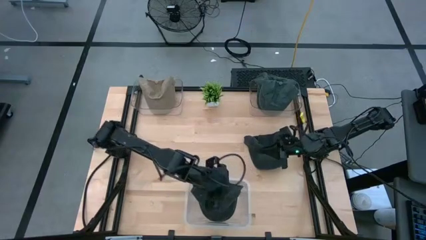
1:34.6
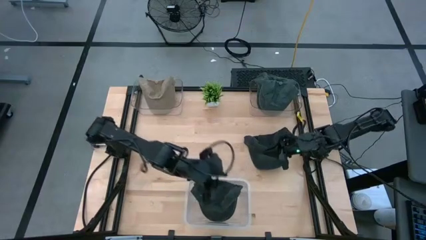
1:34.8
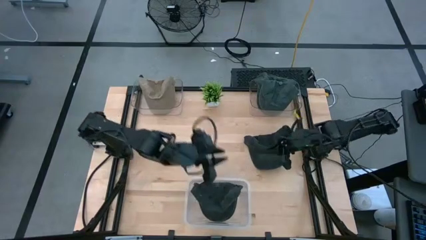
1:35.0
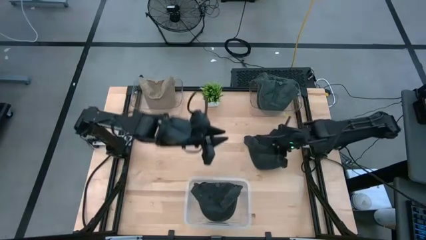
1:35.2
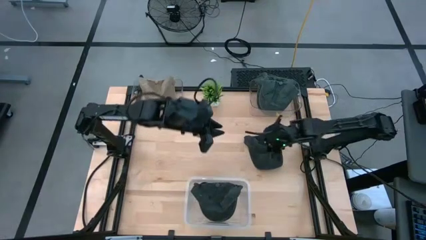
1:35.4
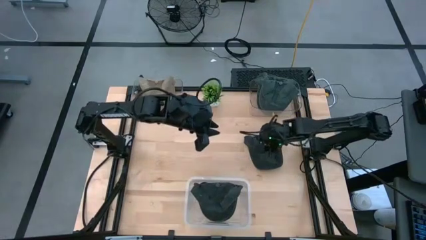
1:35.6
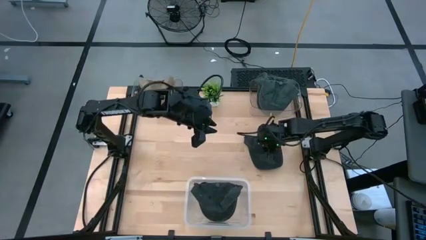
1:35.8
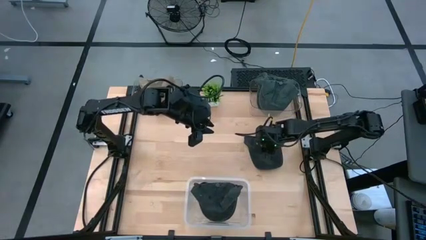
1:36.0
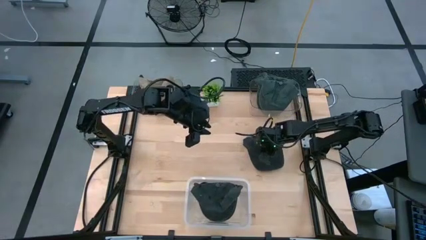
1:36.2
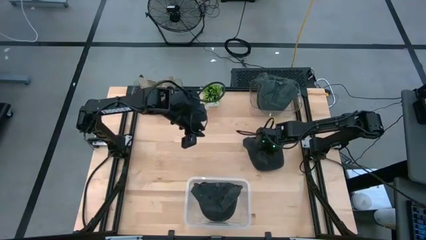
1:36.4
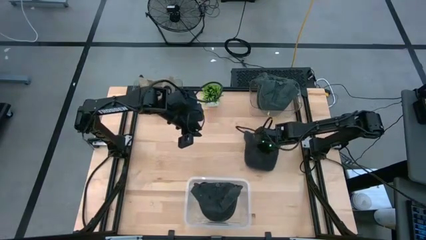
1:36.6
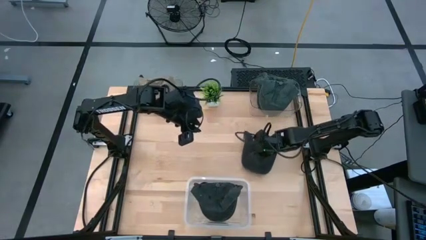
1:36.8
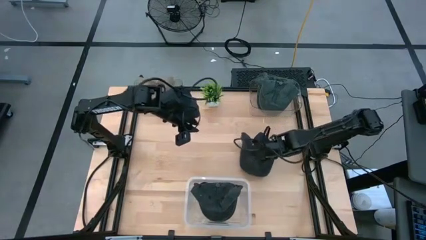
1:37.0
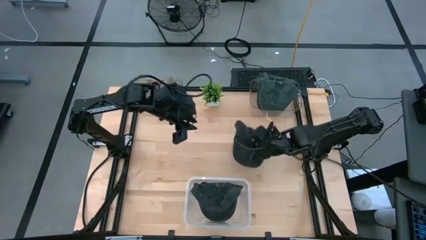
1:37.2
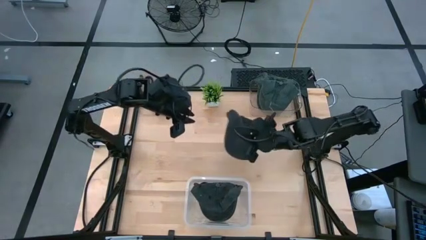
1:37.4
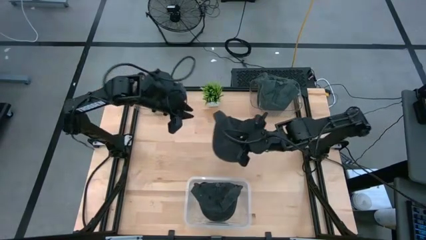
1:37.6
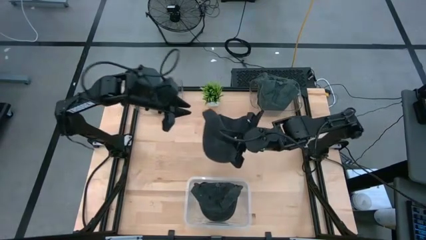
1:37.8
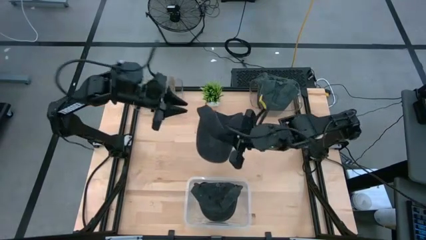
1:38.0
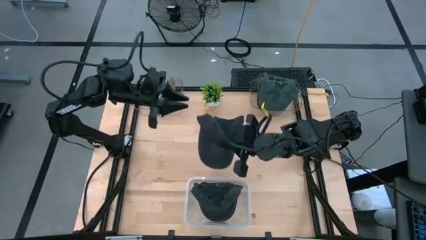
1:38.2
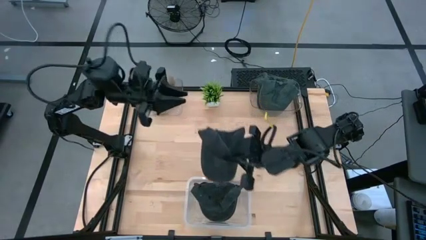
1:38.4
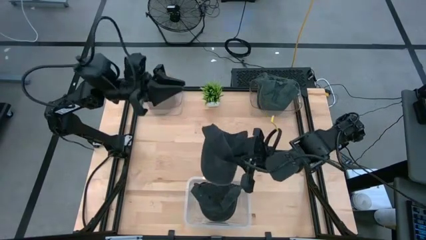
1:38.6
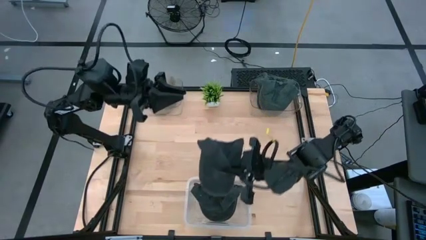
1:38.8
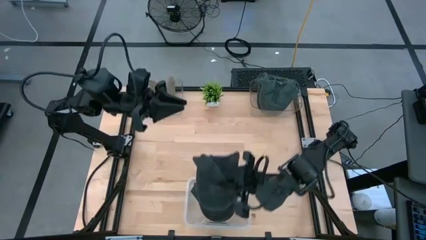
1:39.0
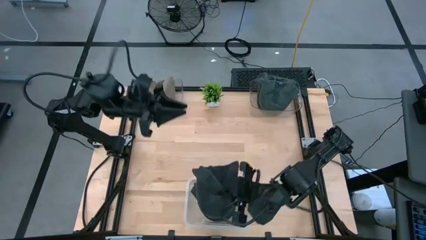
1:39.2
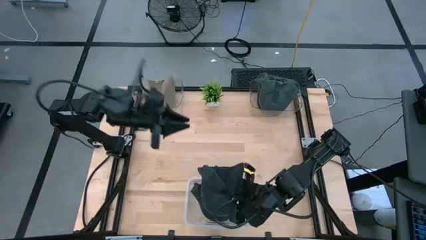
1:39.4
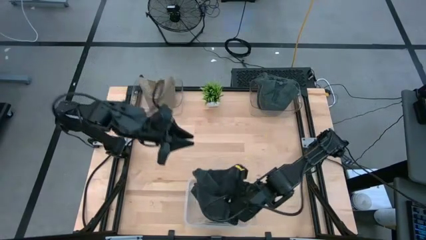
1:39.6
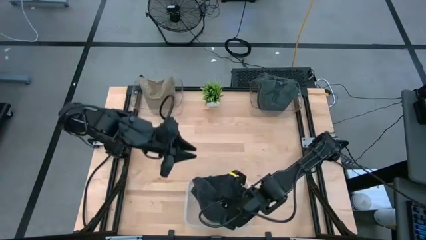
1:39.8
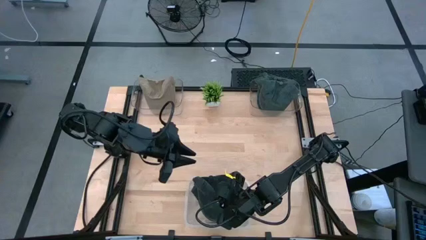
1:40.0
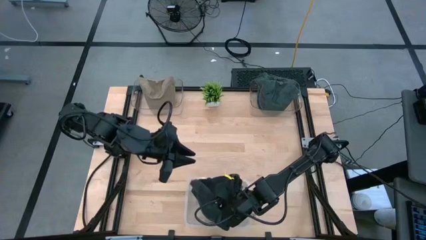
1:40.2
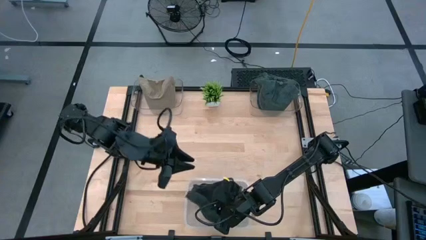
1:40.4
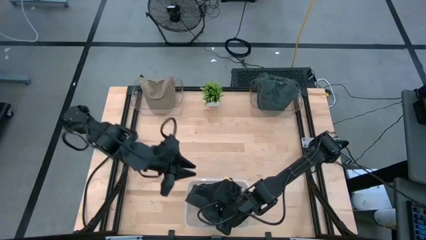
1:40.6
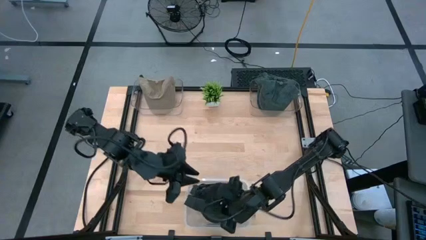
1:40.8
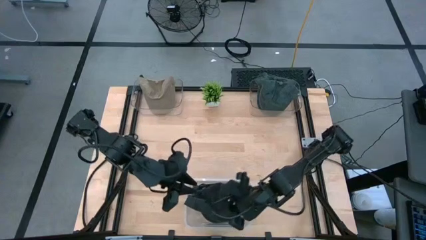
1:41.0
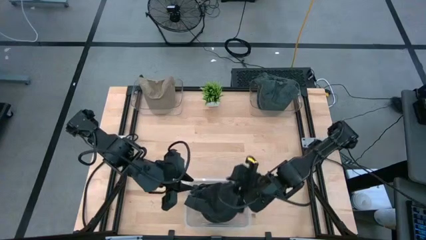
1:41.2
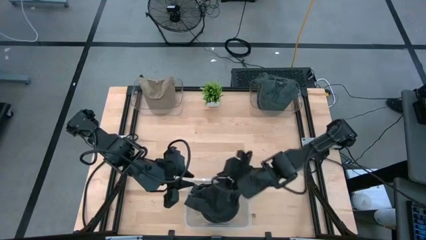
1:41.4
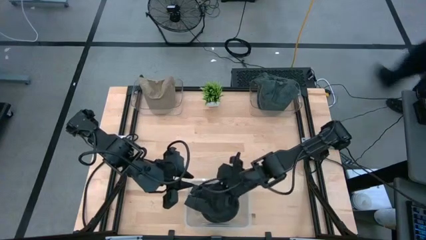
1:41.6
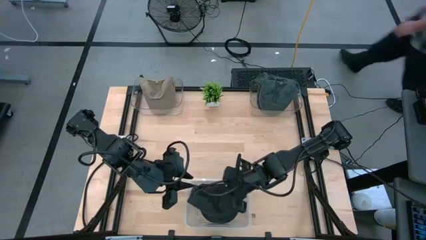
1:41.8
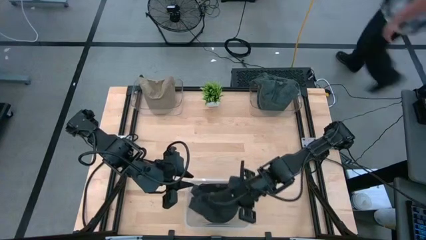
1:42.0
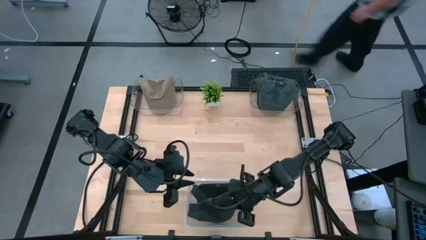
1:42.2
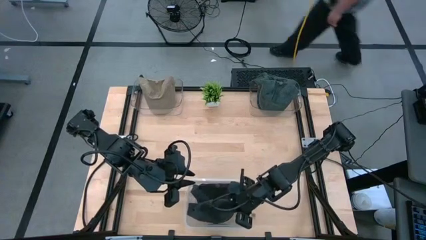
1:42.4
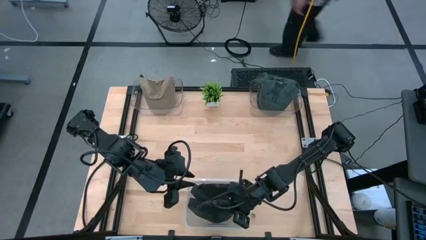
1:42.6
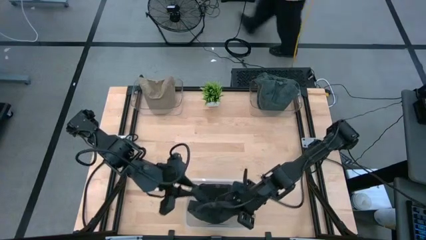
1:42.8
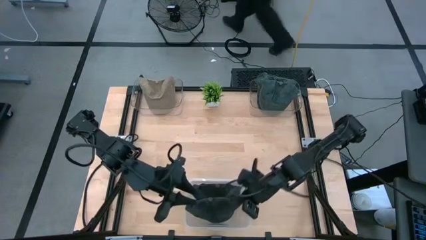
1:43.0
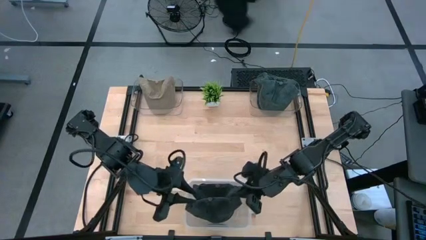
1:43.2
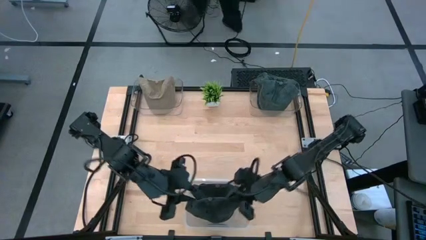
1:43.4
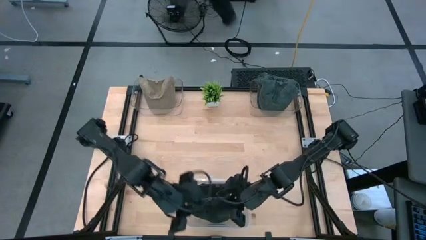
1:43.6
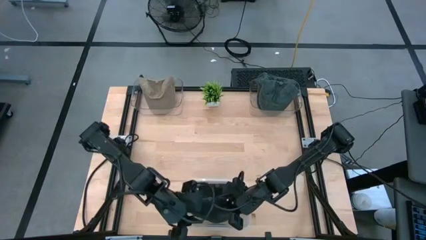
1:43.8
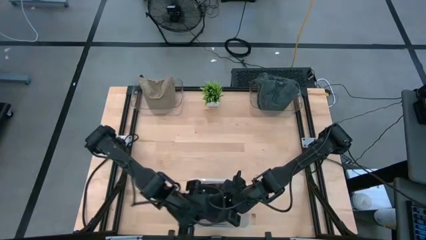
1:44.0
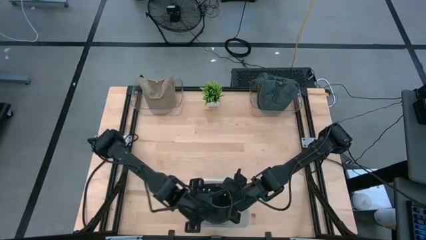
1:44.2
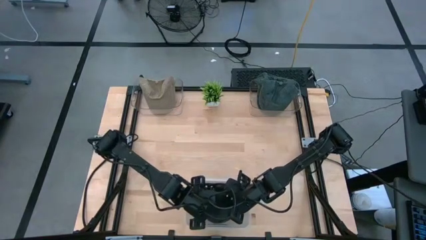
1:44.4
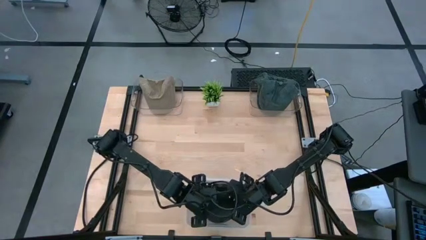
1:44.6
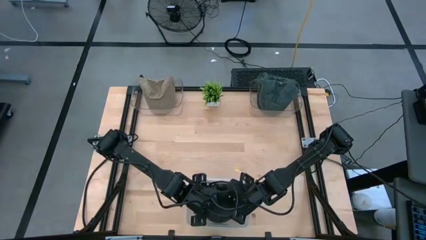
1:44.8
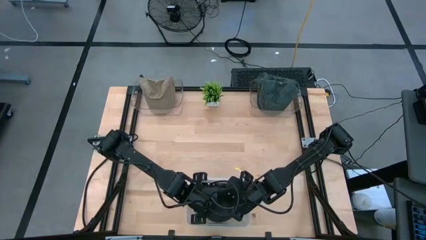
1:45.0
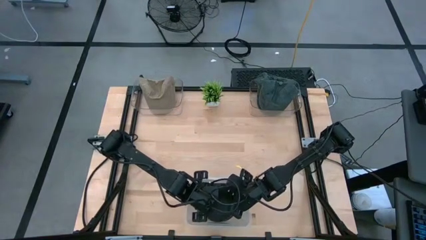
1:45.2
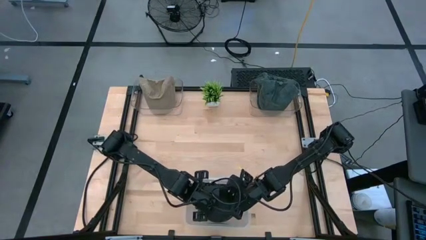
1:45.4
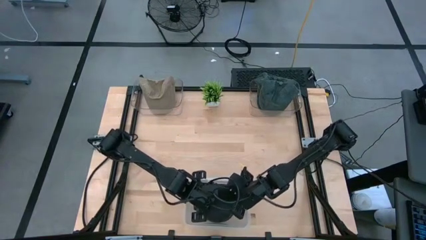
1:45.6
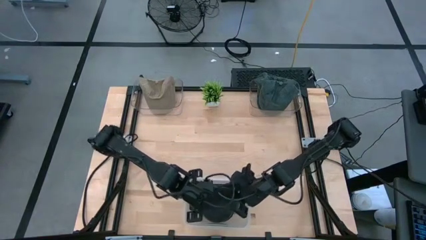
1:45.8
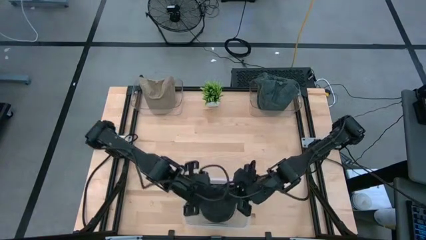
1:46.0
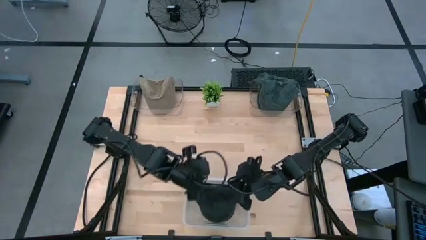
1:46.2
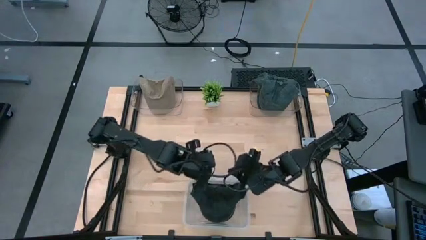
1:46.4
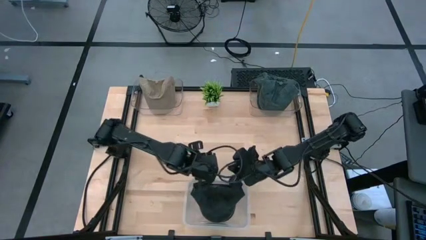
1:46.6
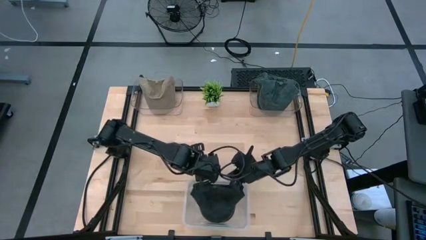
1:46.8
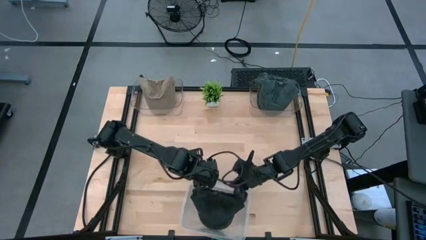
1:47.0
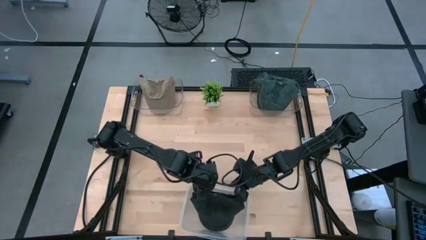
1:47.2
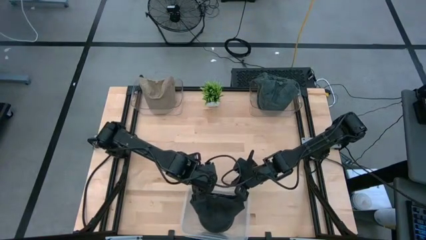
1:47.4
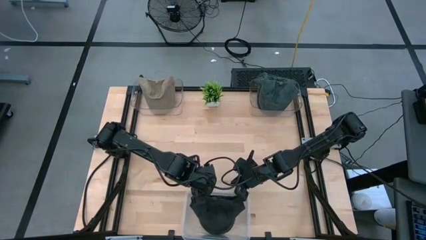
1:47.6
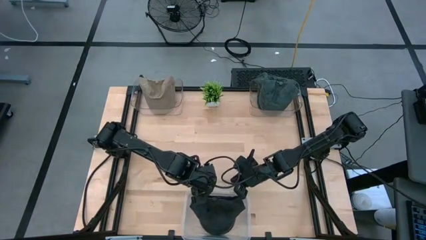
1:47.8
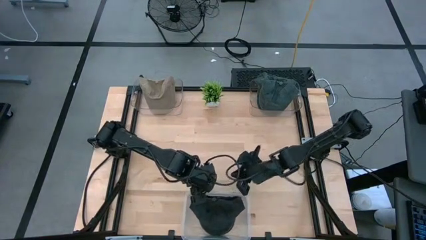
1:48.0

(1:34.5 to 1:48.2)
Task: Pick & Place hat
Put the black cap into the white transparent bin

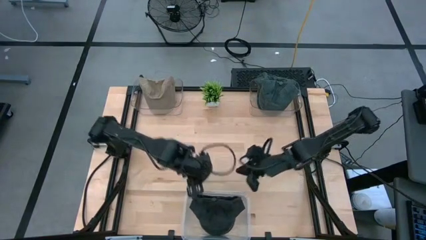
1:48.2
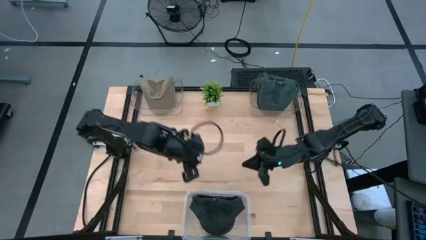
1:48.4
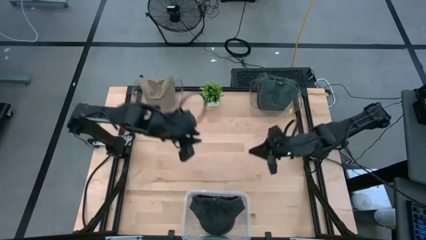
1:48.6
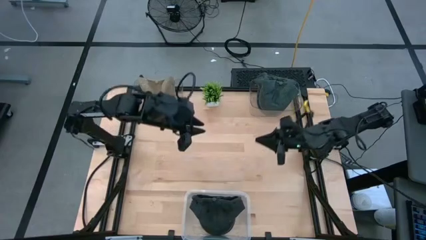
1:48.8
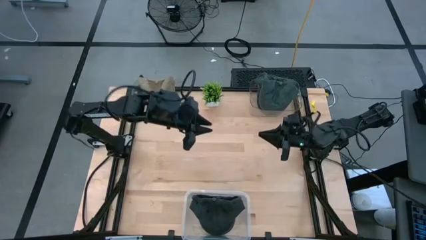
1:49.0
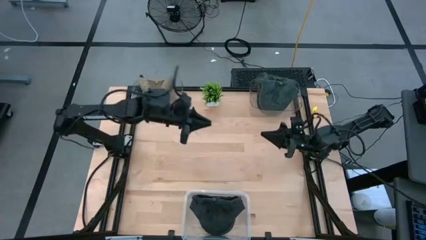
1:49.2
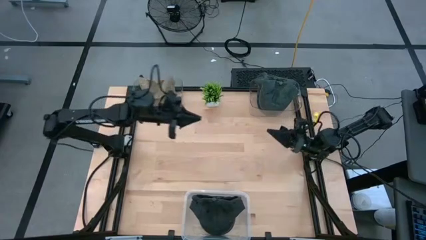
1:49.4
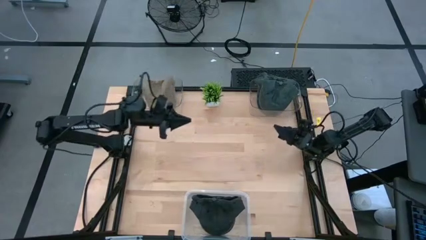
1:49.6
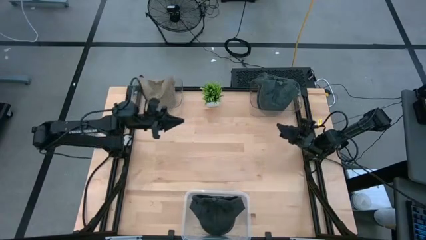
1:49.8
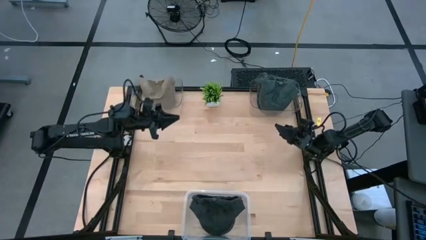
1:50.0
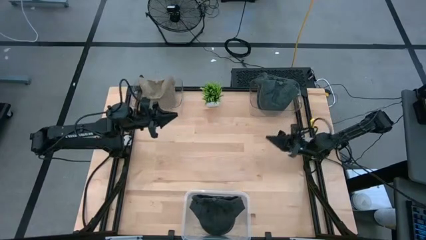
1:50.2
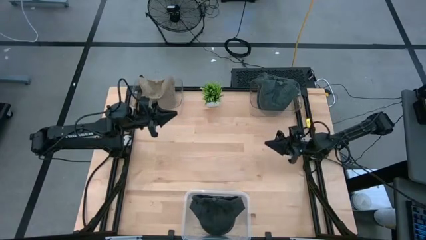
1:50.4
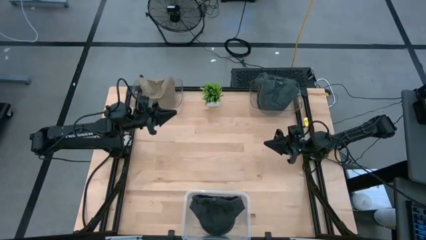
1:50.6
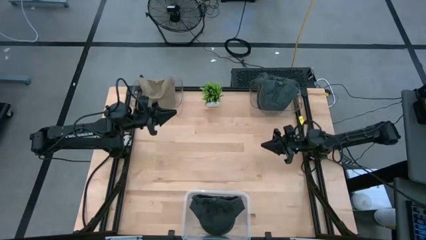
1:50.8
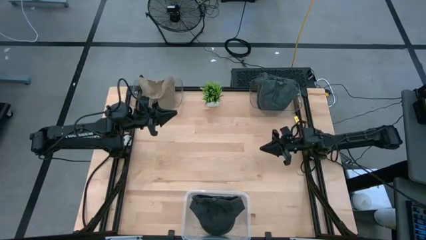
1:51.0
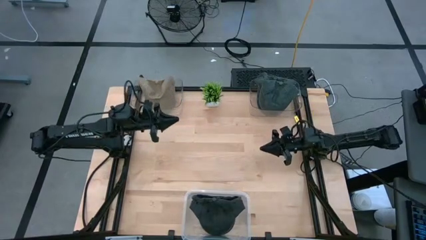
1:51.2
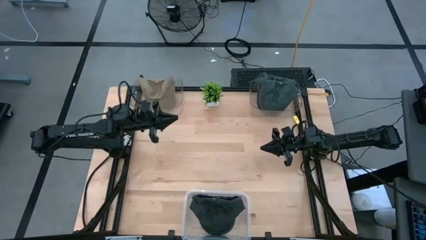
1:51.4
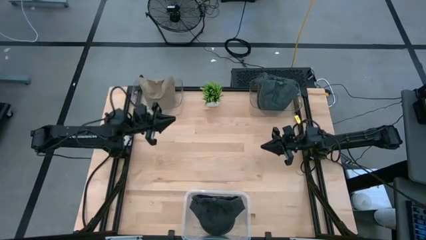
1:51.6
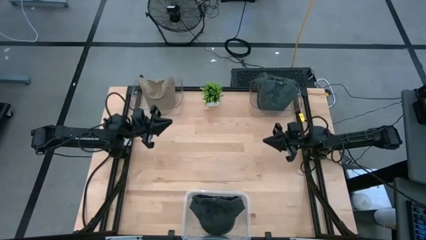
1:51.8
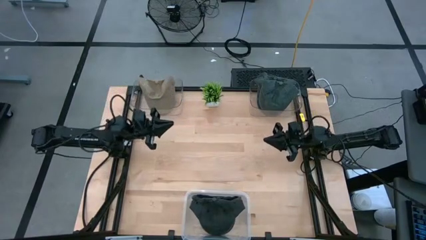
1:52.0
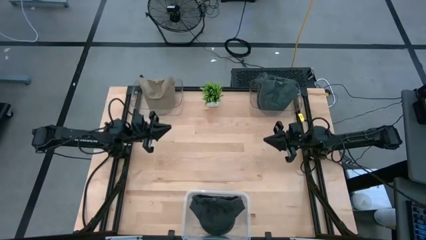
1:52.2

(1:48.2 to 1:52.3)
Return to Home Position
